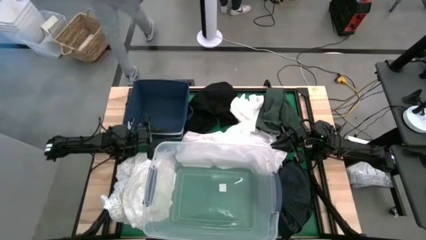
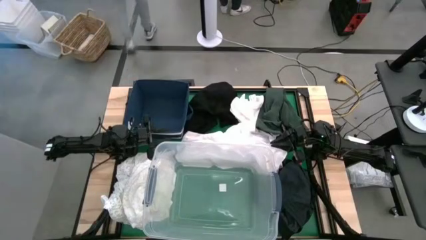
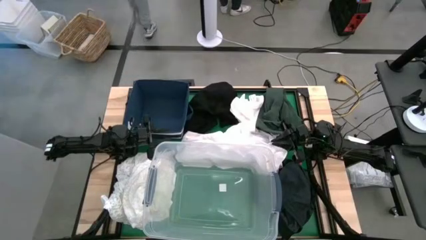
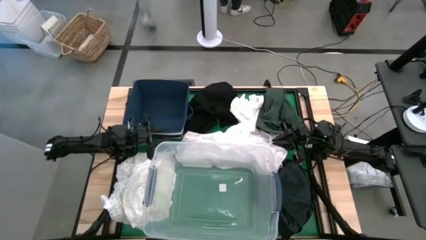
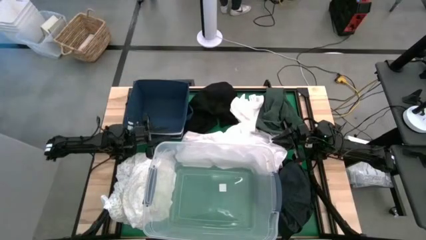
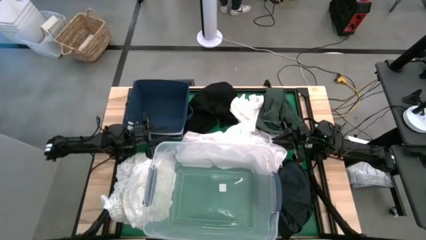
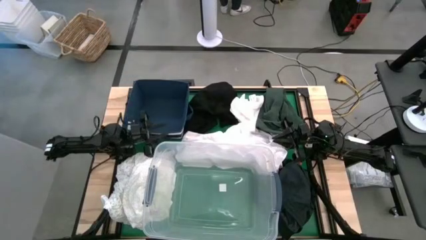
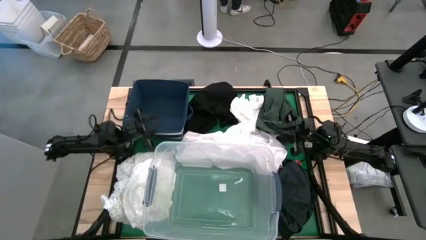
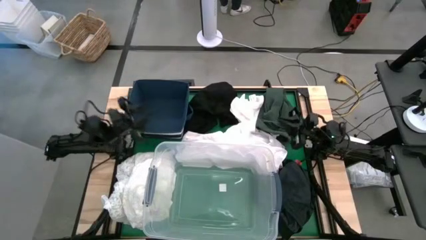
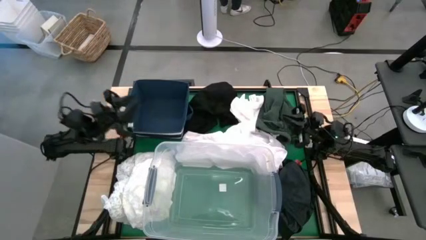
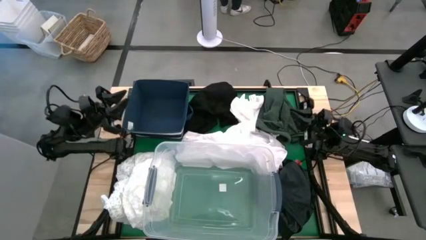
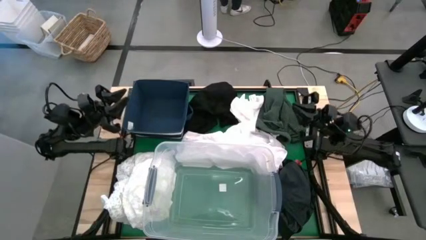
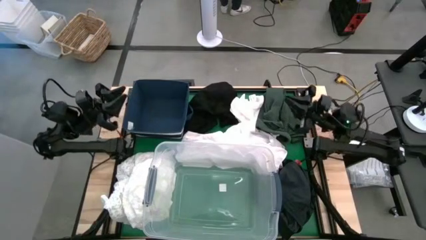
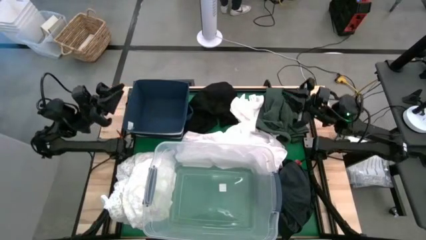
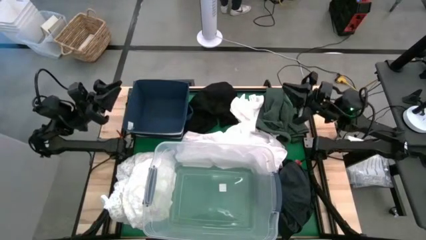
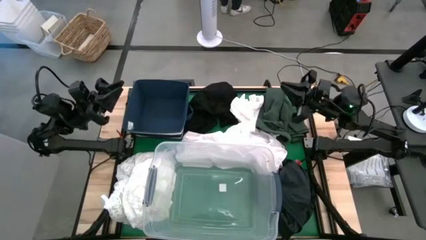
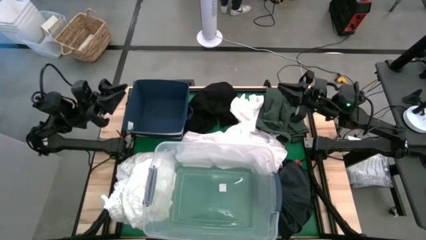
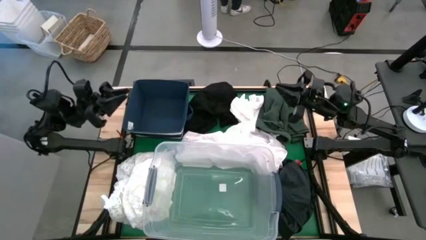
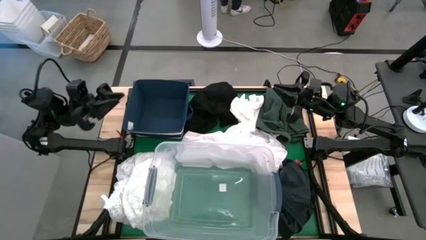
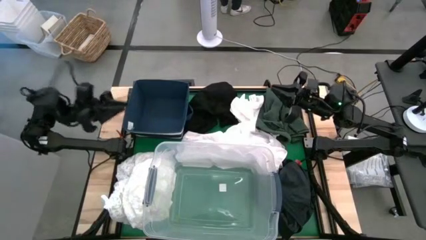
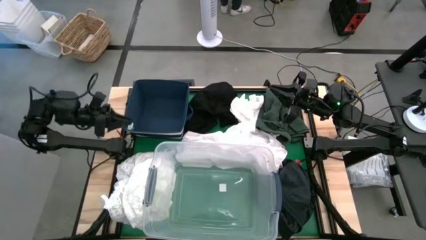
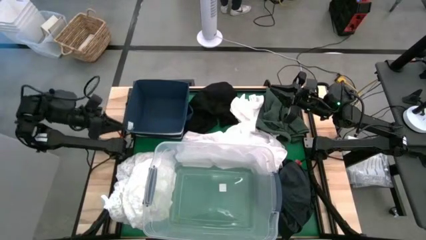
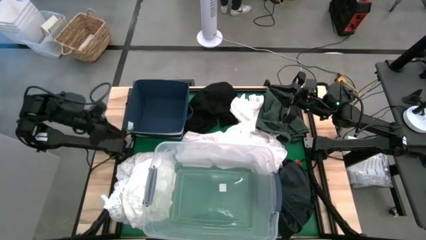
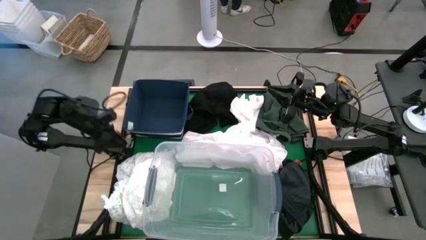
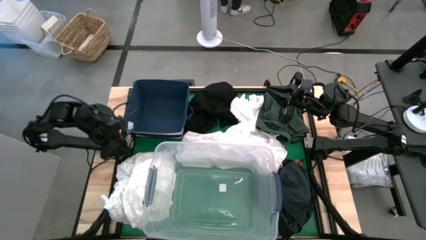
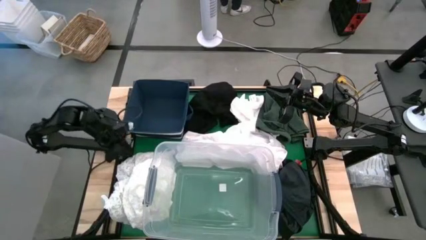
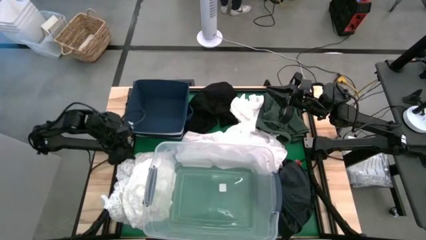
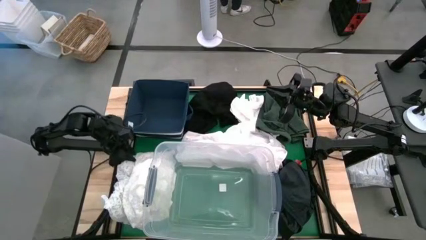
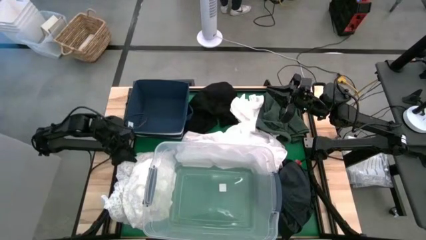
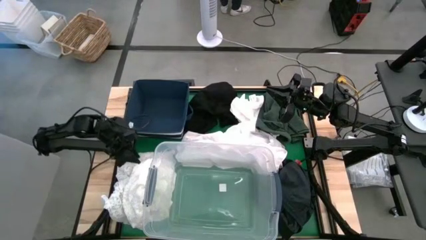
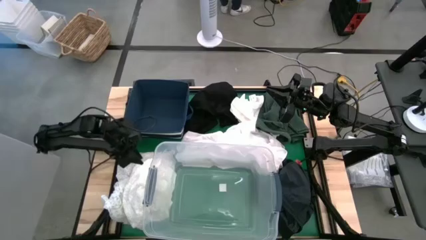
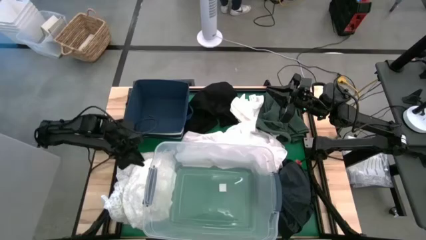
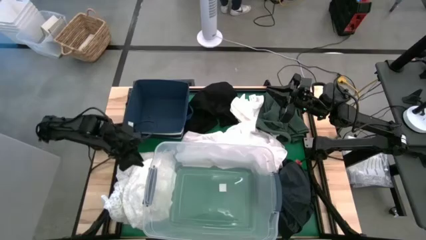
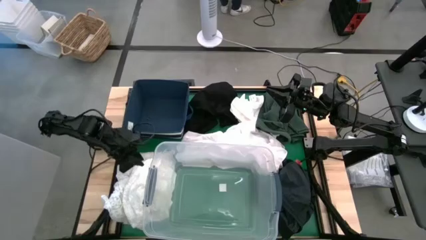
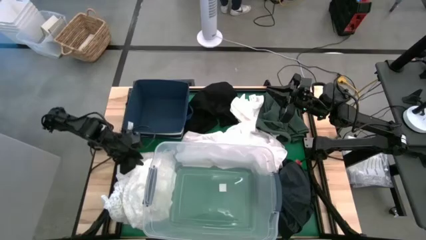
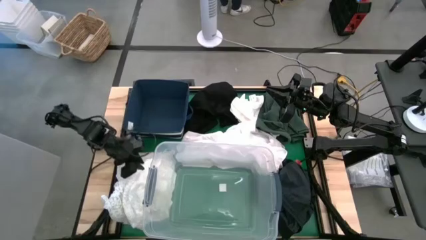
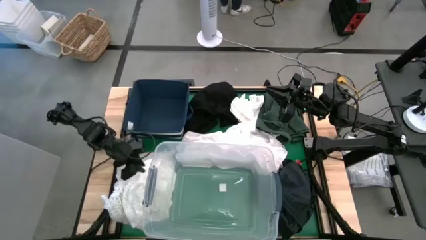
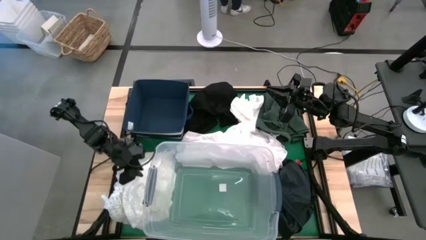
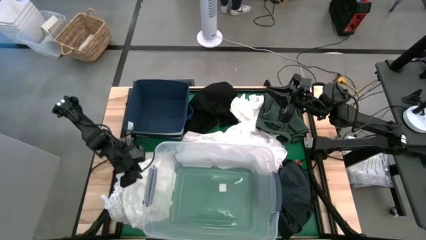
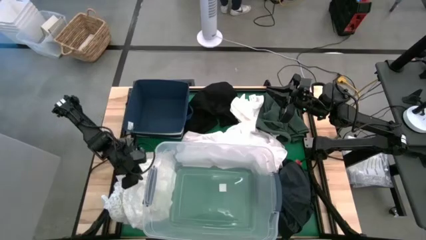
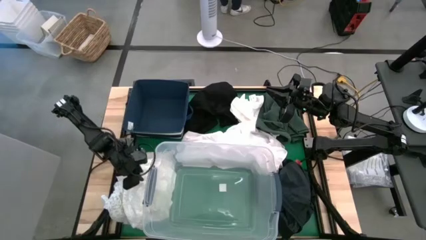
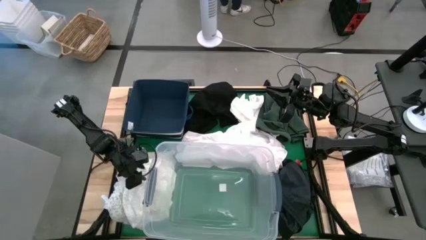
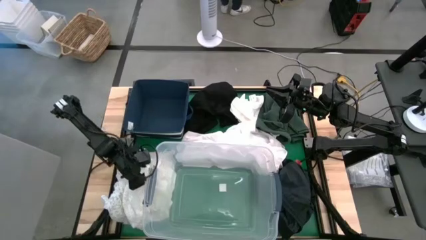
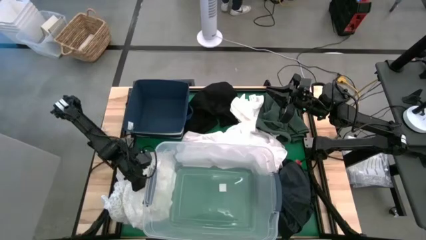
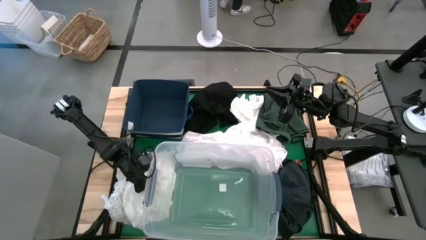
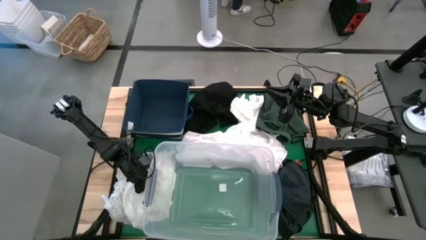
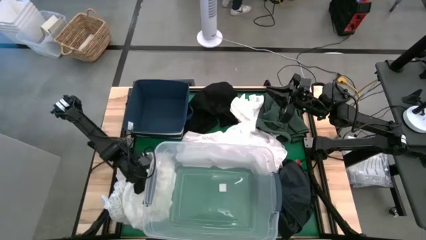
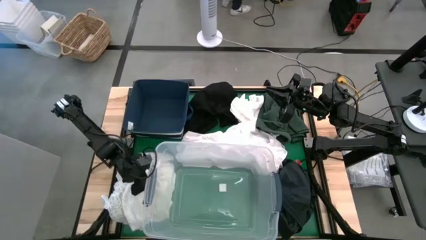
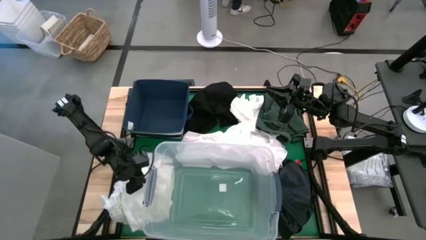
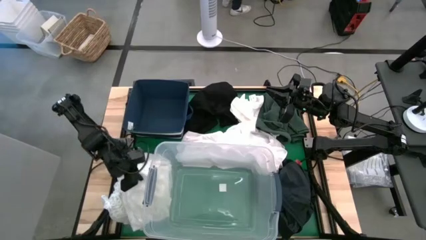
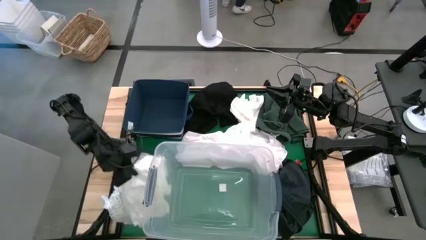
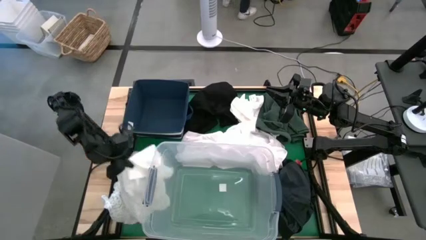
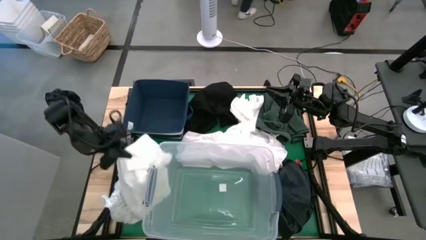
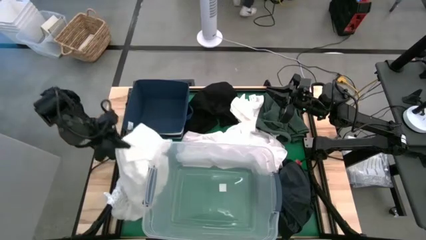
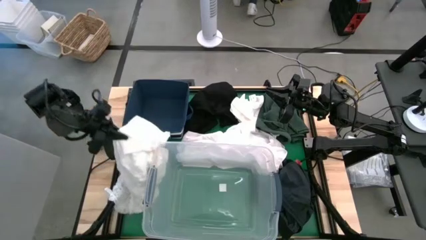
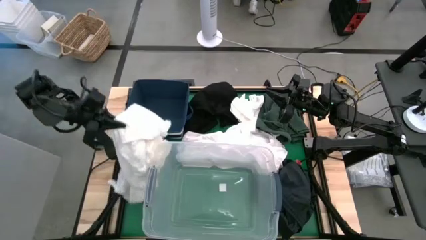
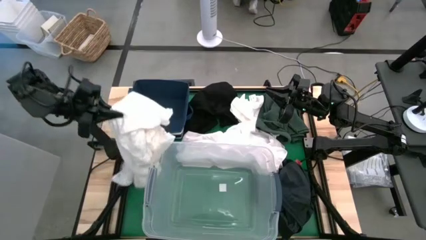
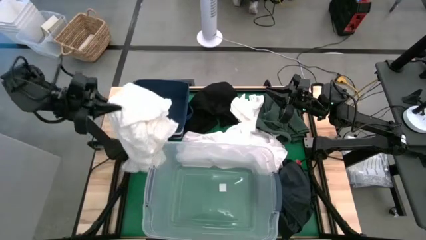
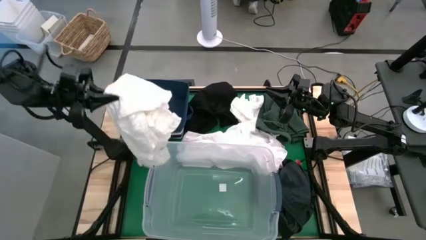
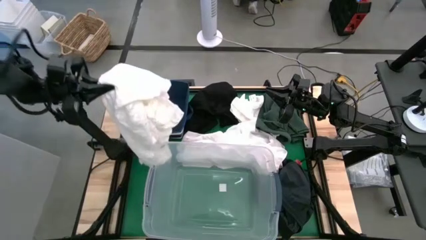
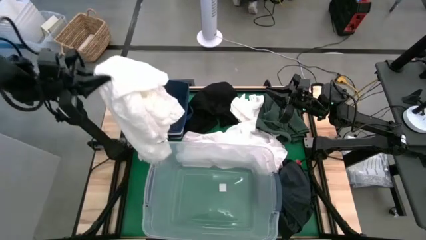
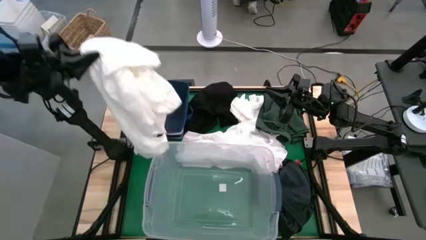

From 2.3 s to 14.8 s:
Put the white blouse into the blue laundry bin
